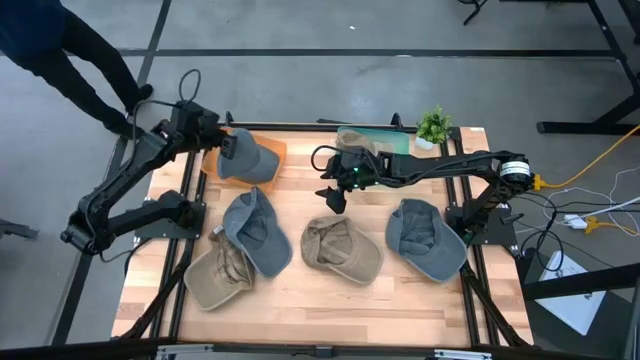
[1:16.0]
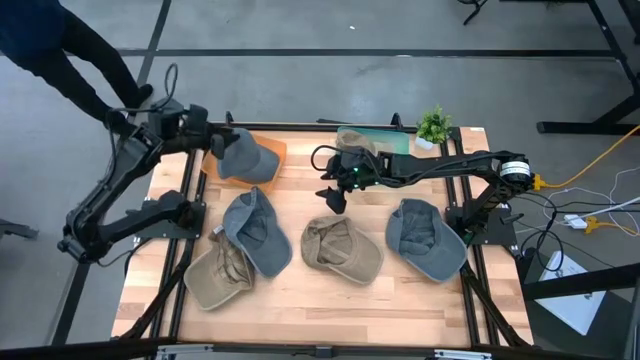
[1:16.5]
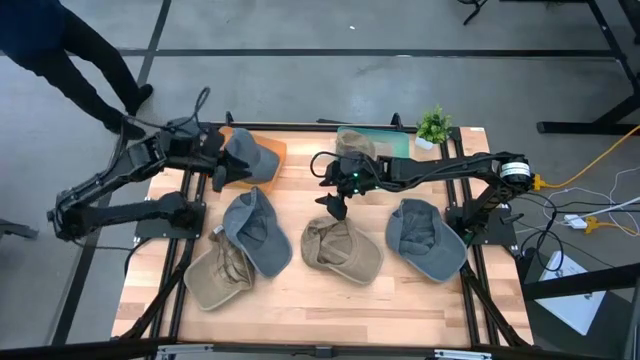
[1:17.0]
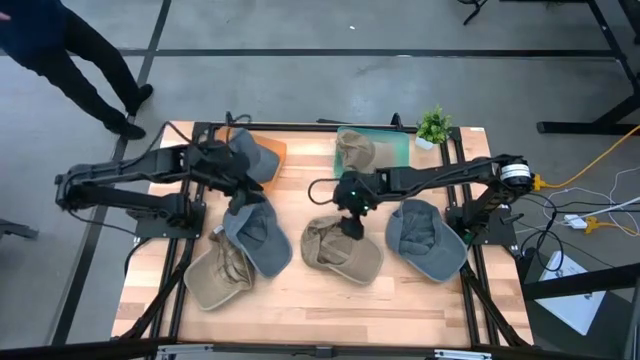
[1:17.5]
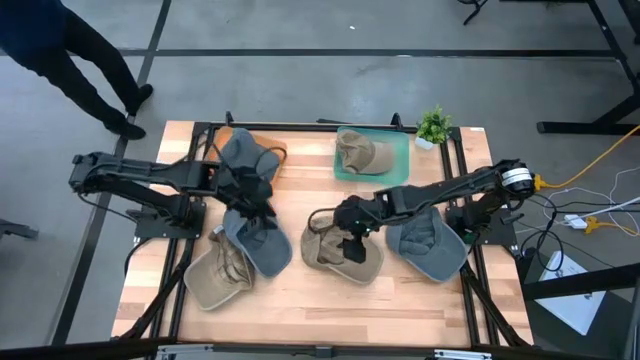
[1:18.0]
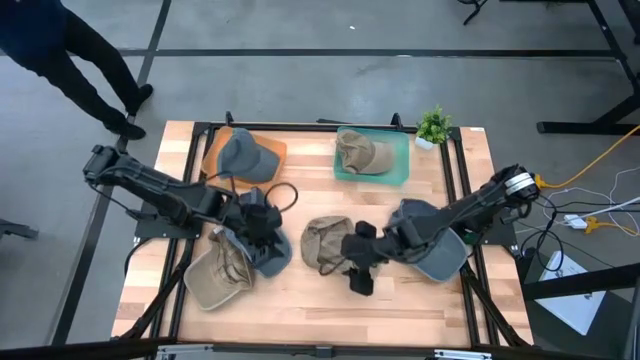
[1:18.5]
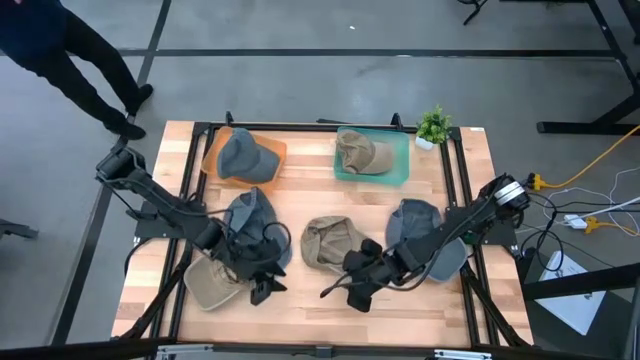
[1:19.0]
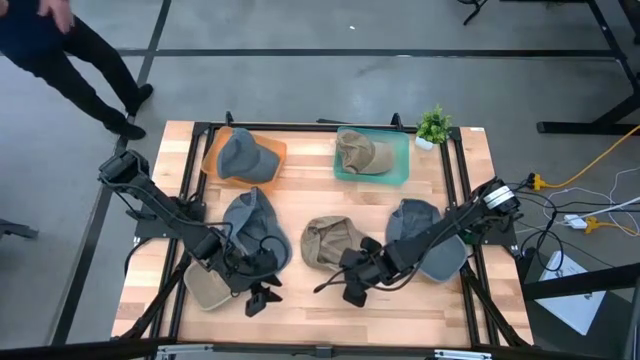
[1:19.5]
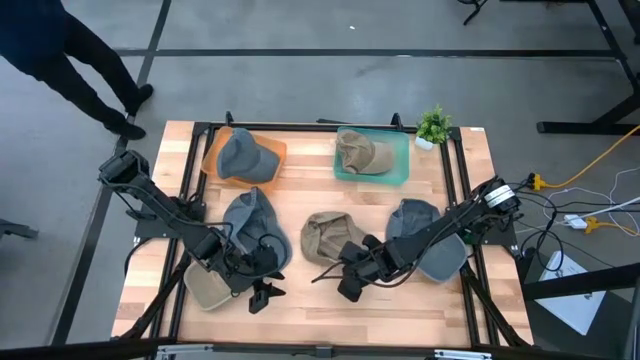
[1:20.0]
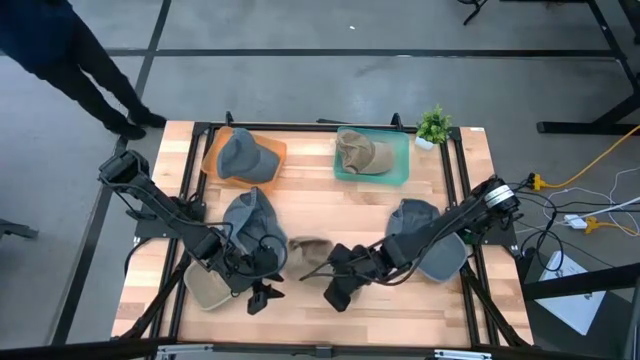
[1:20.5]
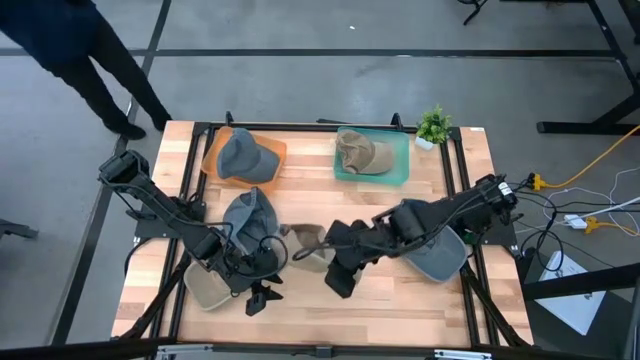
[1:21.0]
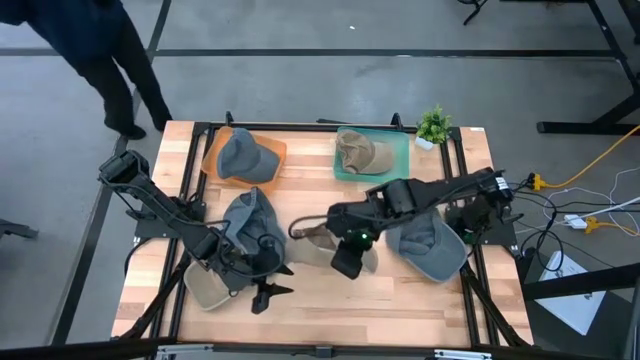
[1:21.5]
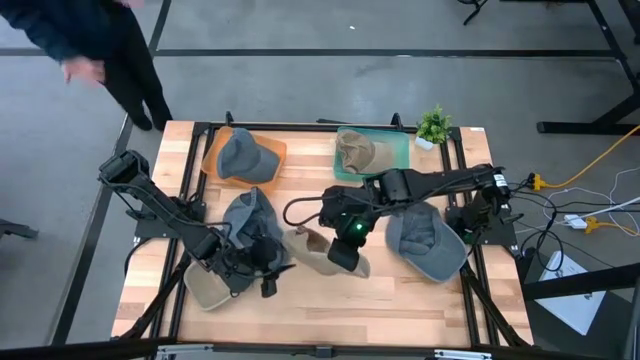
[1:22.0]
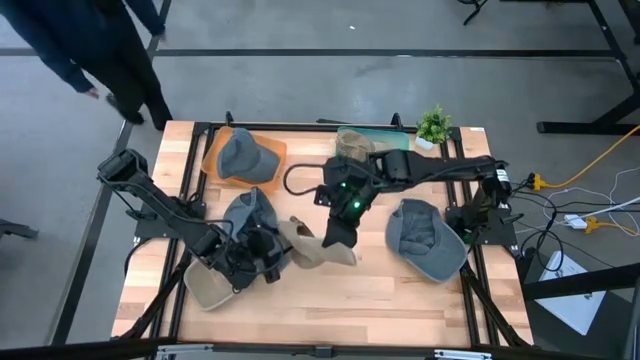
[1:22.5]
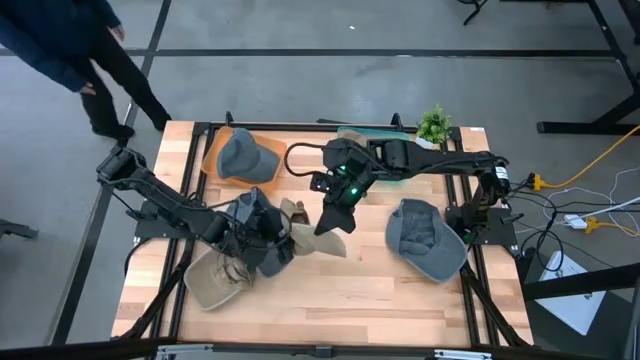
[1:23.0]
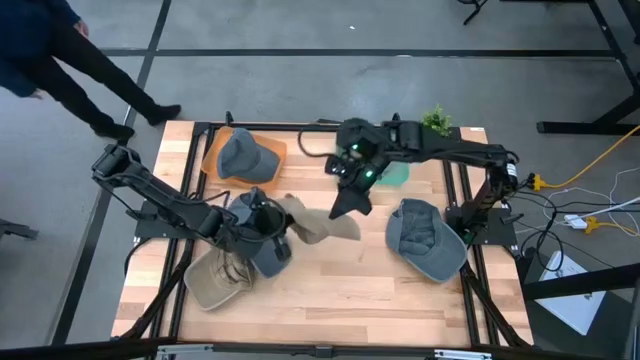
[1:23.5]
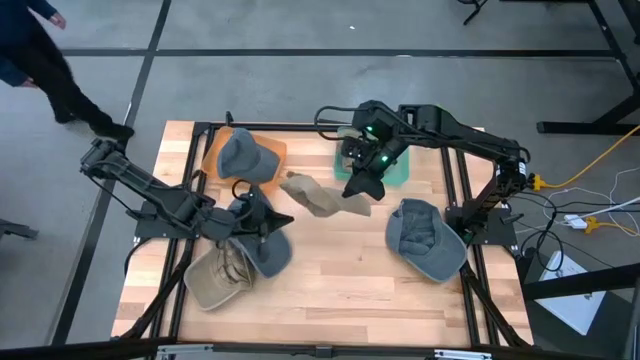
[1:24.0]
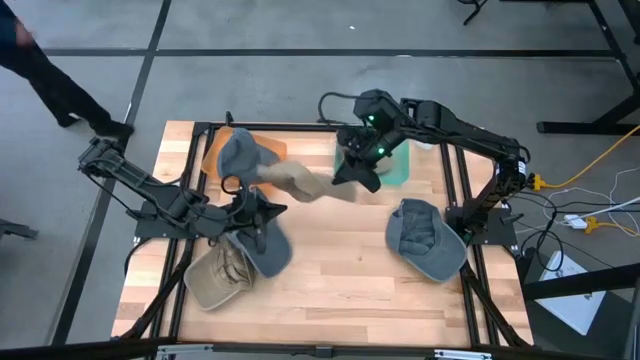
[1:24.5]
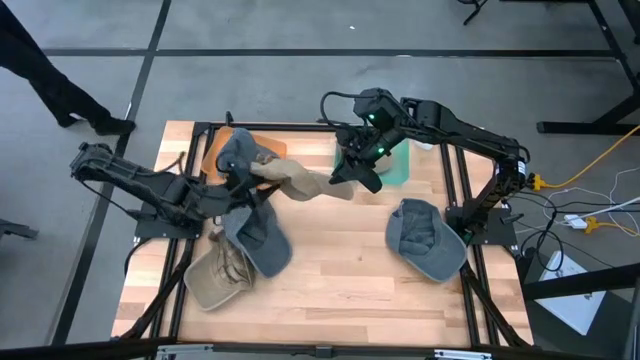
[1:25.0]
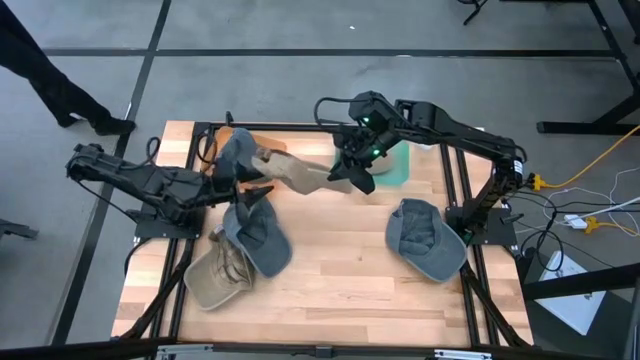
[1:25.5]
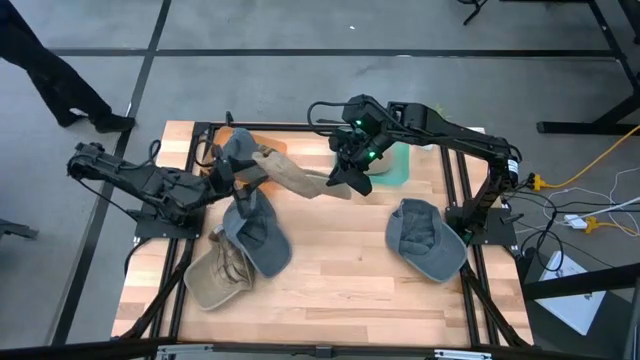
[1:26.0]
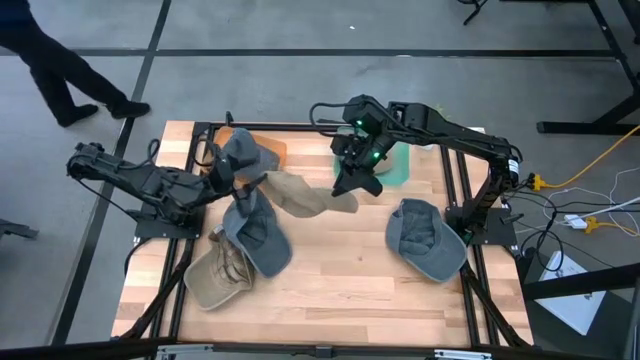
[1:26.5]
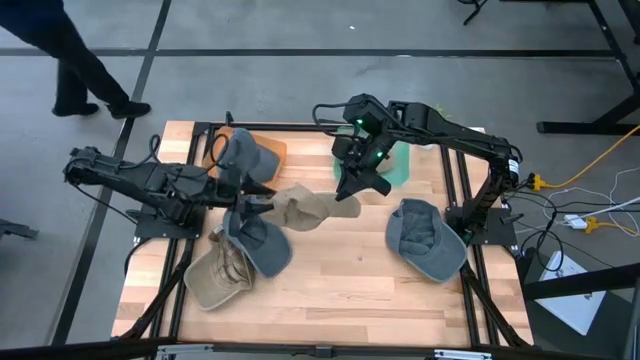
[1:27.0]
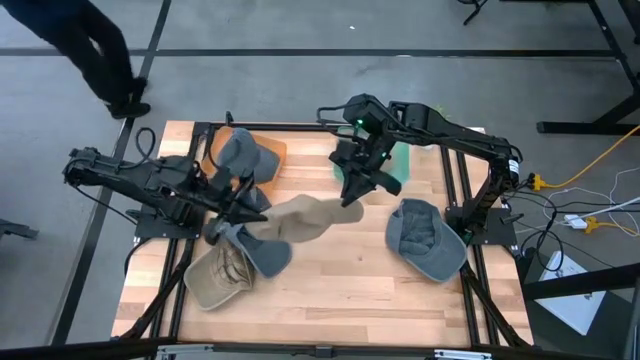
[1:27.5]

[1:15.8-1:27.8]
Task: Pick & Place hat
Put the right brown cap into the green bin

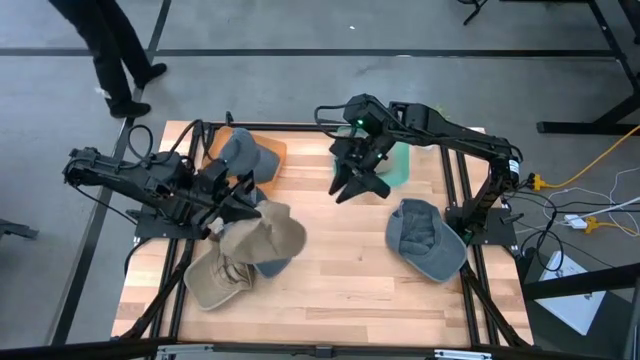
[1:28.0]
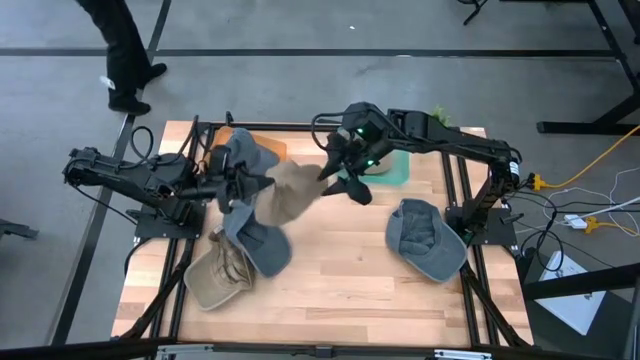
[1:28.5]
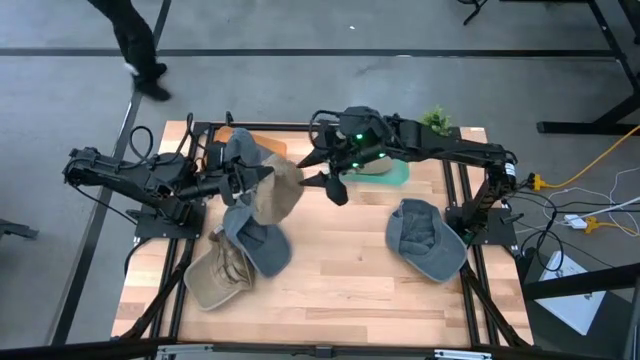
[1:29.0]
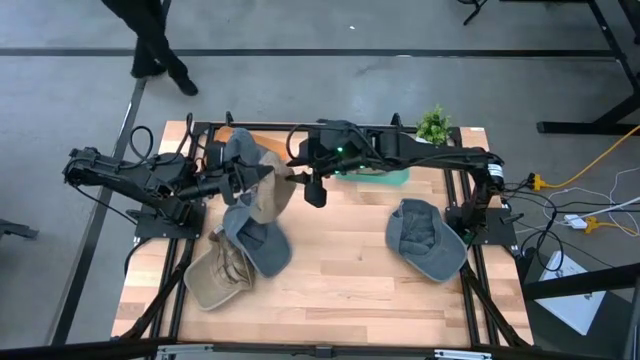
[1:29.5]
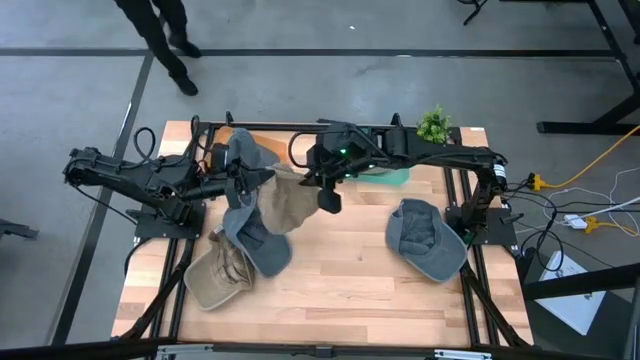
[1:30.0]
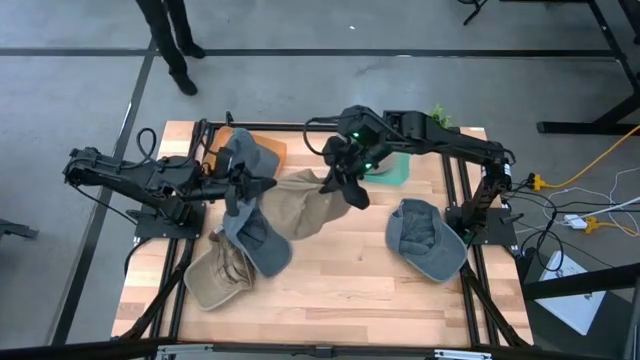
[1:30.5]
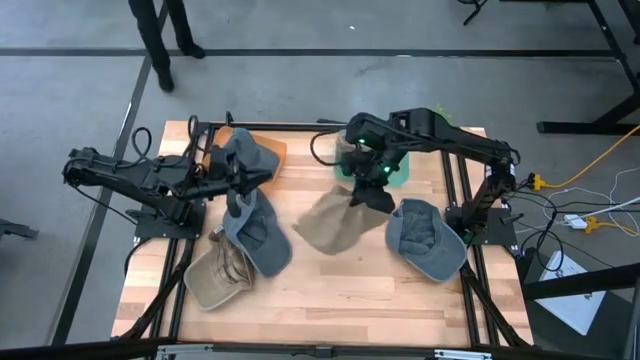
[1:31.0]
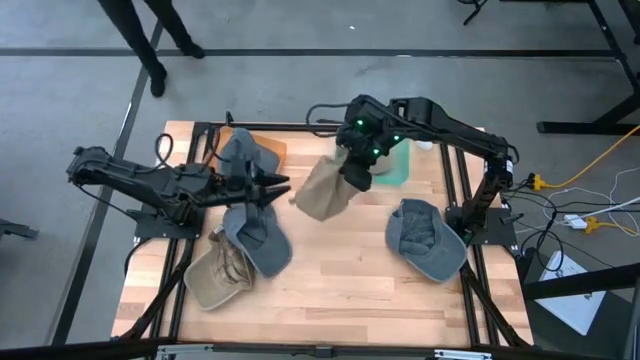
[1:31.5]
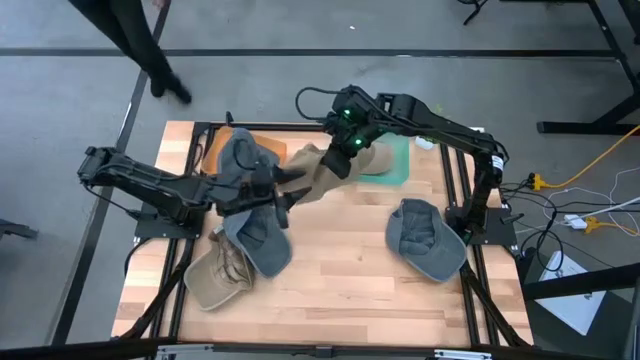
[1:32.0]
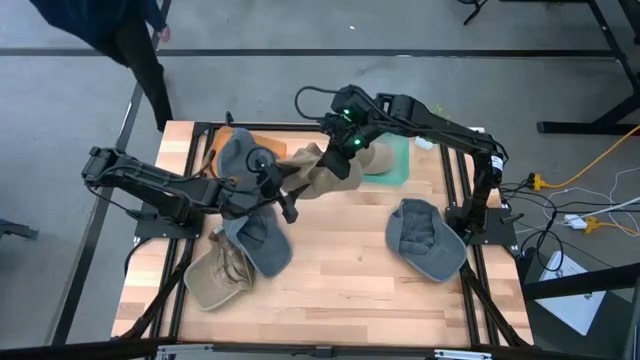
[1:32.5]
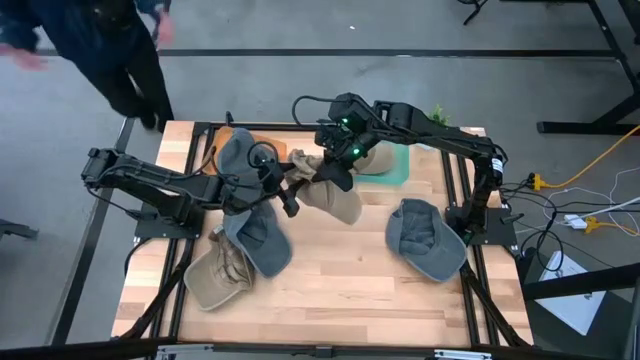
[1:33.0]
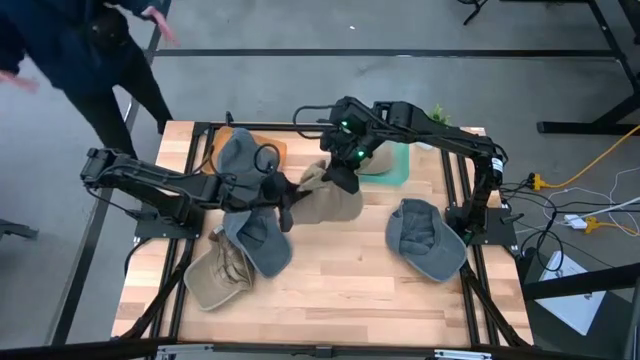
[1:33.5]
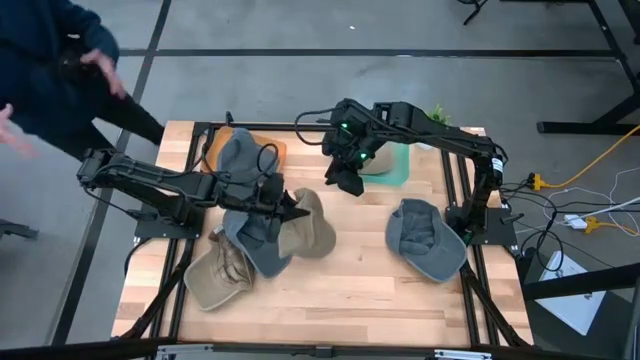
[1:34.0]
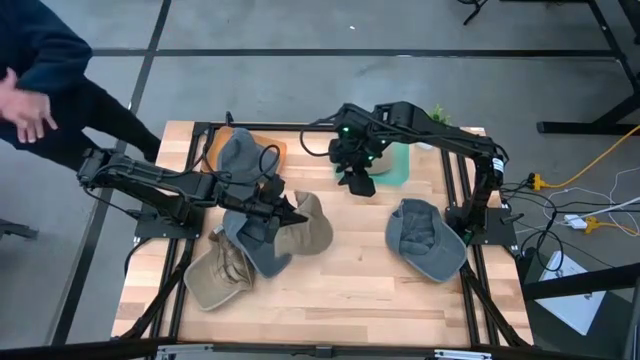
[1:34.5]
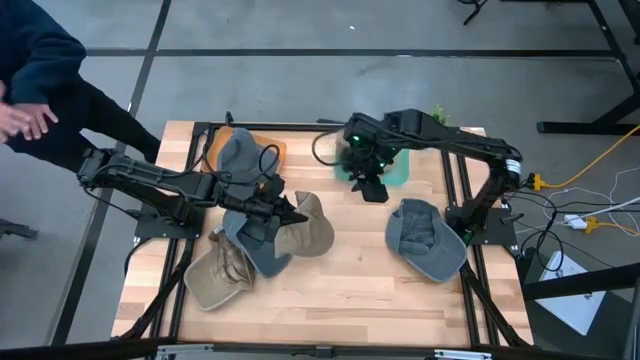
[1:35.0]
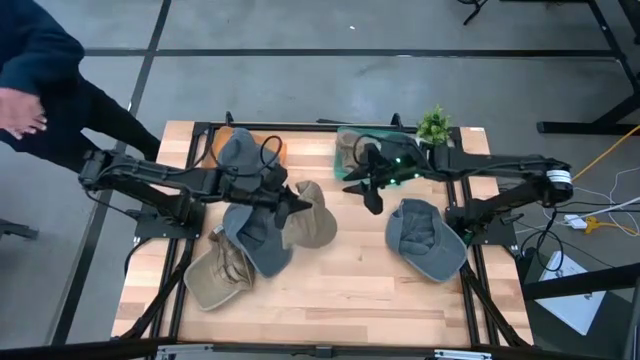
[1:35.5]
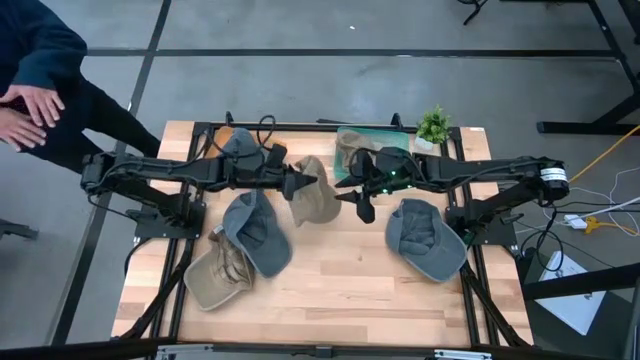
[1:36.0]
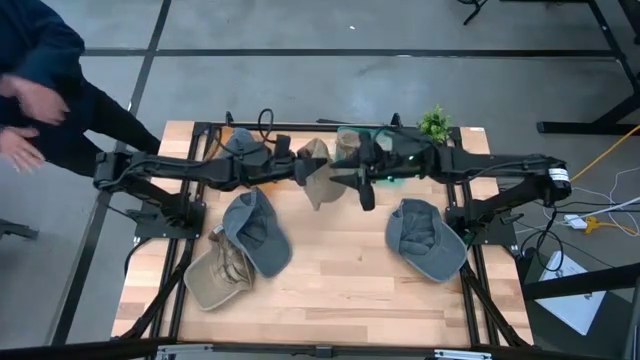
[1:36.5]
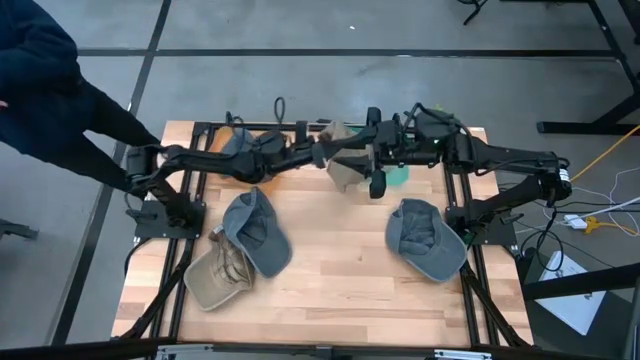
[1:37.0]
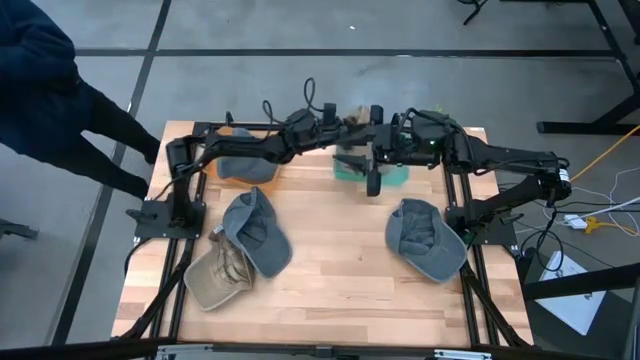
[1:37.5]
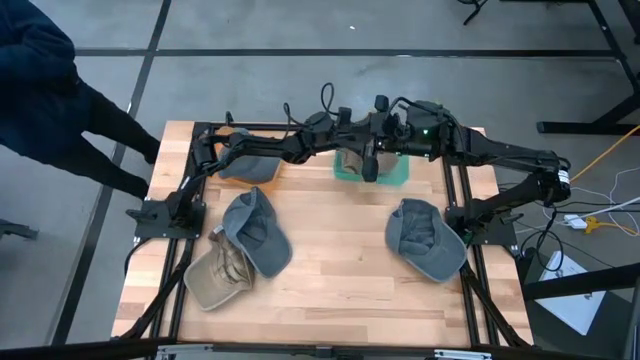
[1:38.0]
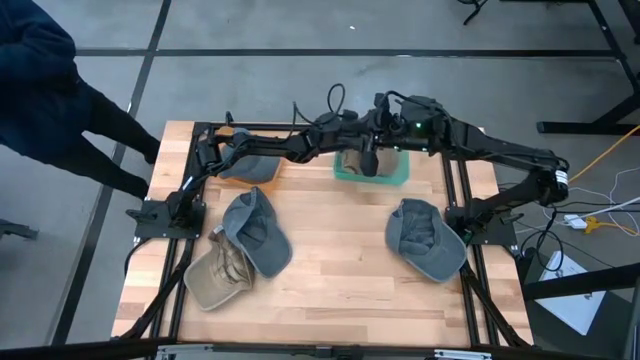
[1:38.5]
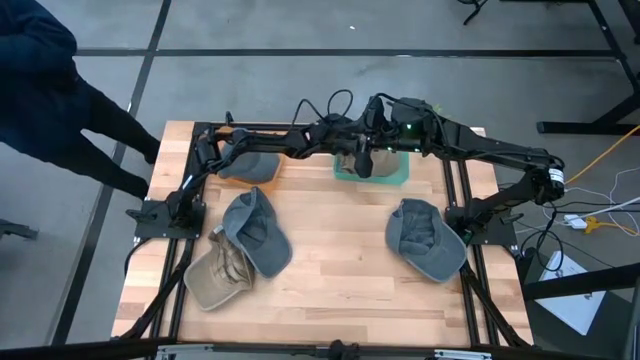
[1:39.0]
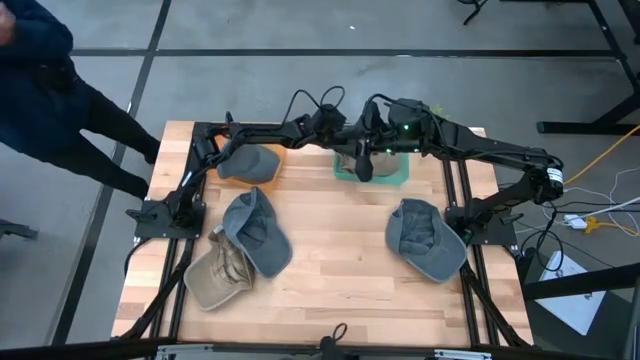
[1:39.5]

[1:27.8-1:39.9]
Put the right brown cap into the green bin
